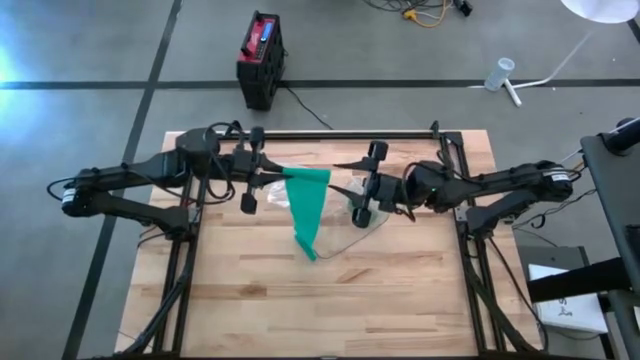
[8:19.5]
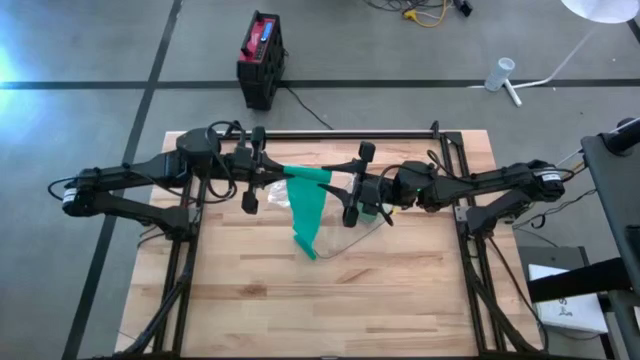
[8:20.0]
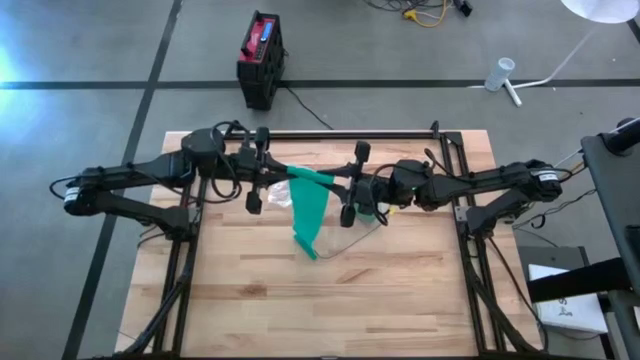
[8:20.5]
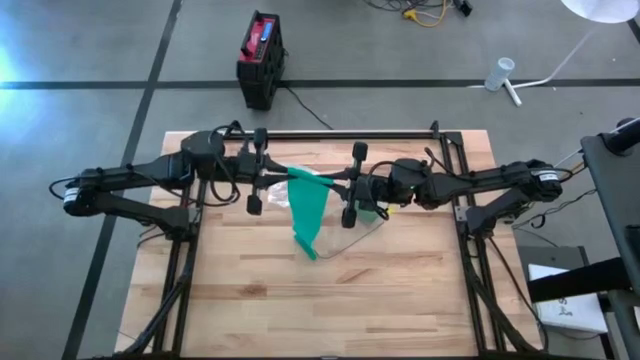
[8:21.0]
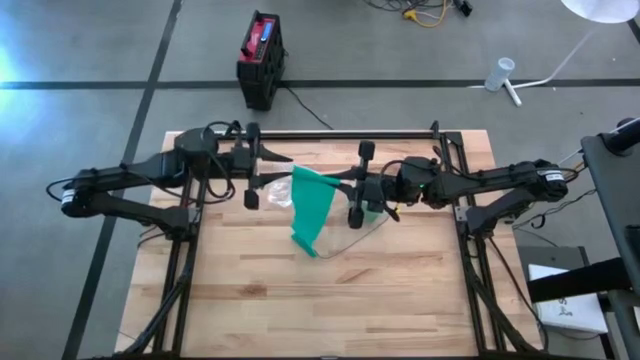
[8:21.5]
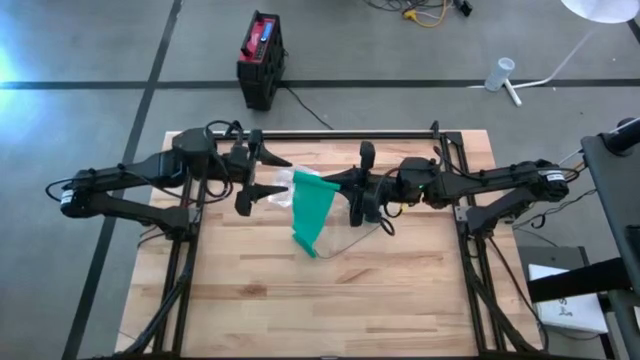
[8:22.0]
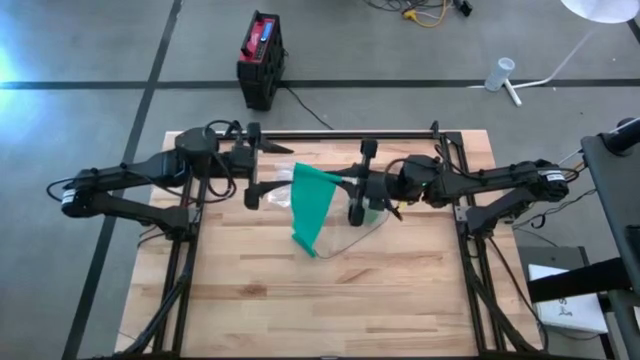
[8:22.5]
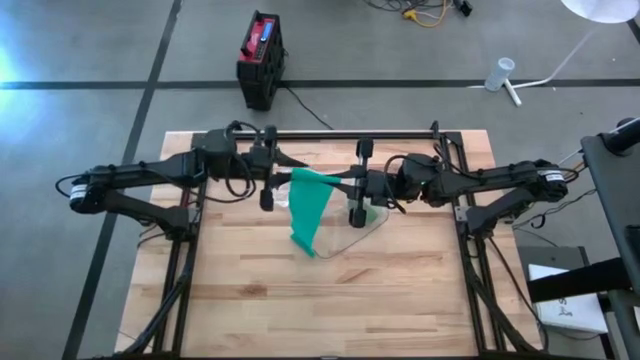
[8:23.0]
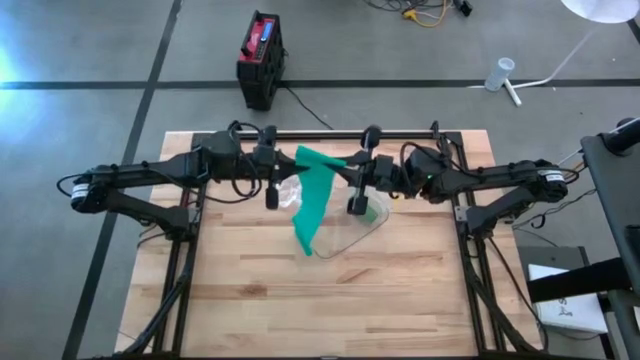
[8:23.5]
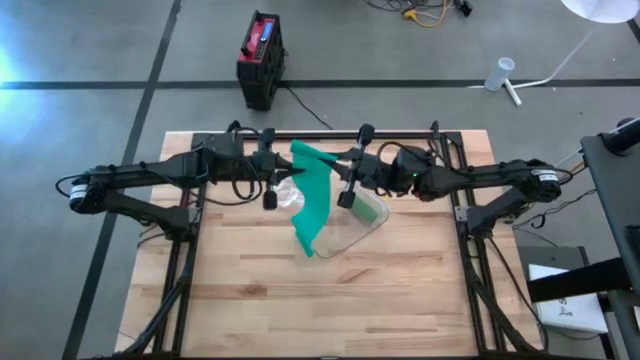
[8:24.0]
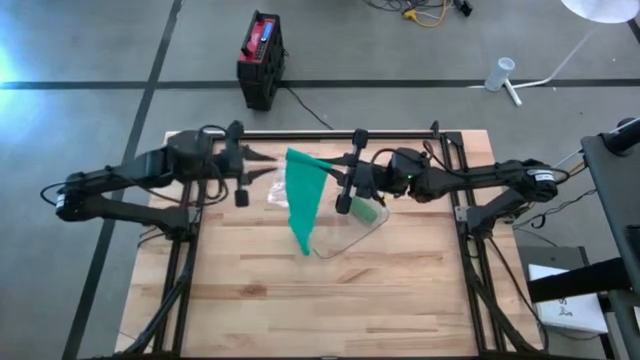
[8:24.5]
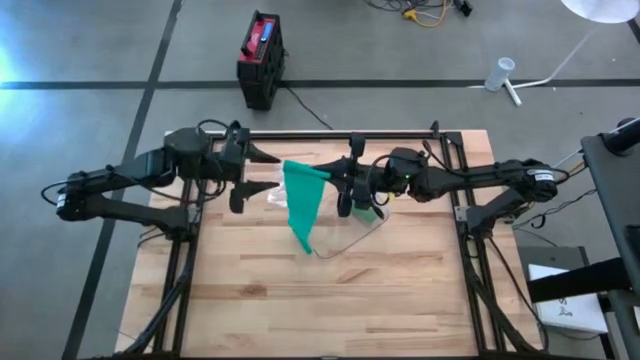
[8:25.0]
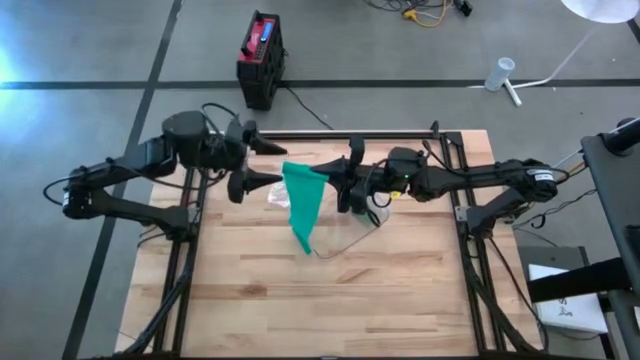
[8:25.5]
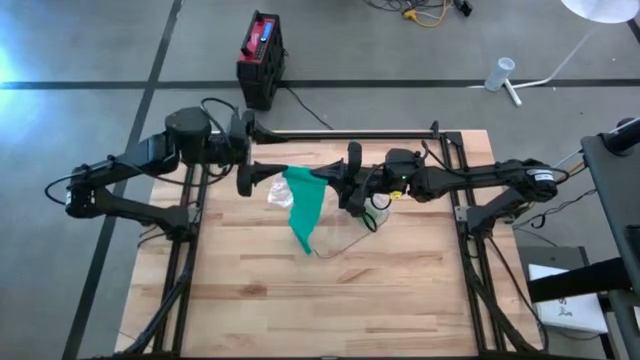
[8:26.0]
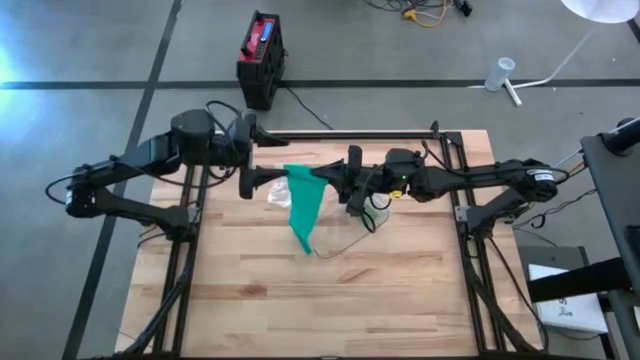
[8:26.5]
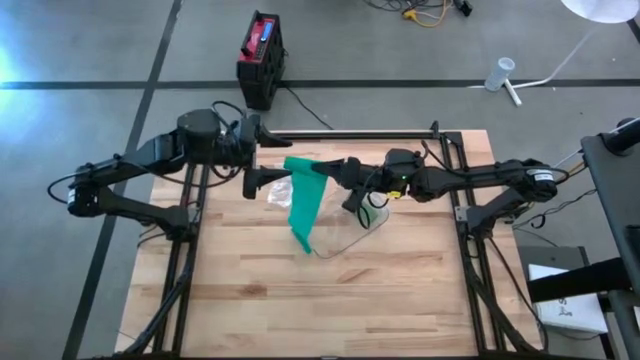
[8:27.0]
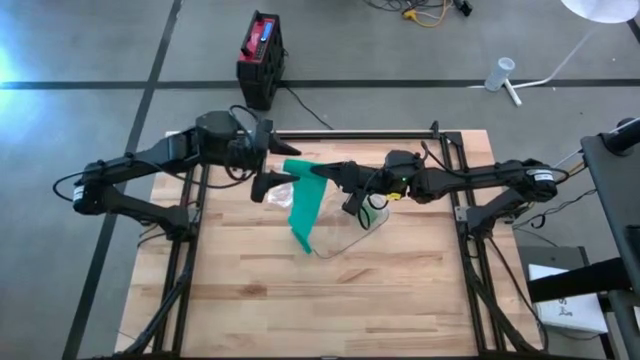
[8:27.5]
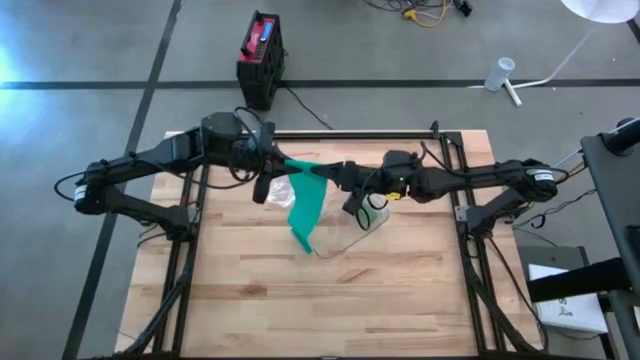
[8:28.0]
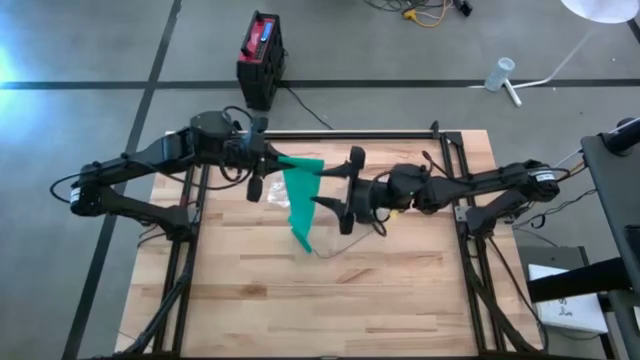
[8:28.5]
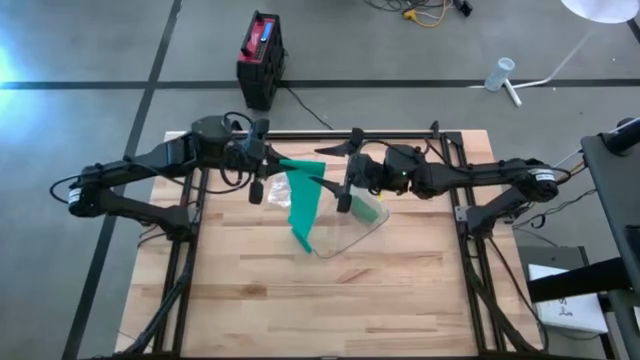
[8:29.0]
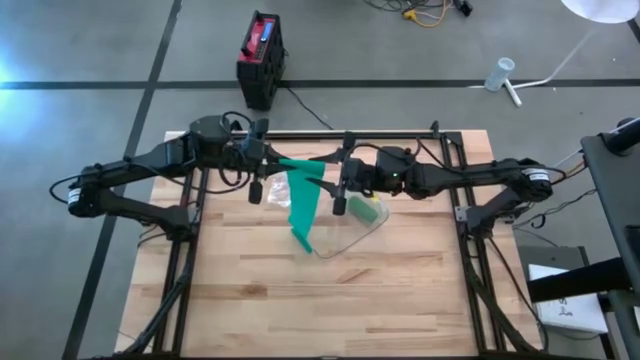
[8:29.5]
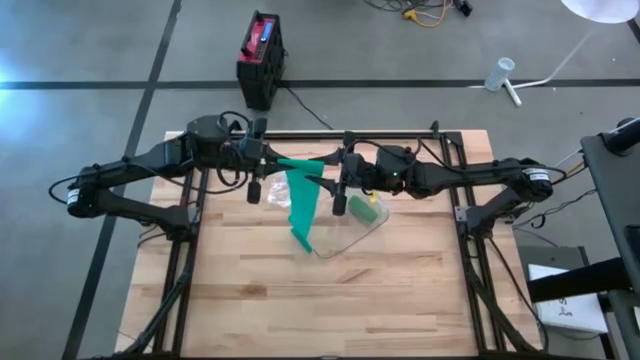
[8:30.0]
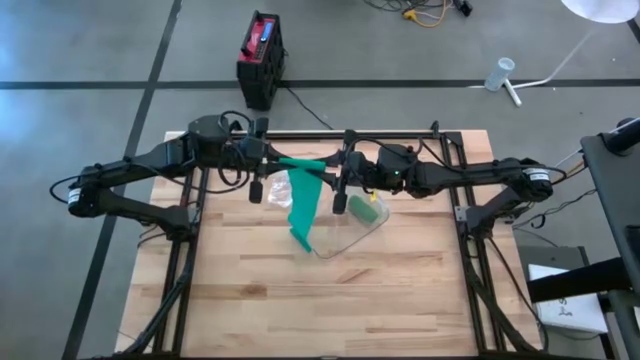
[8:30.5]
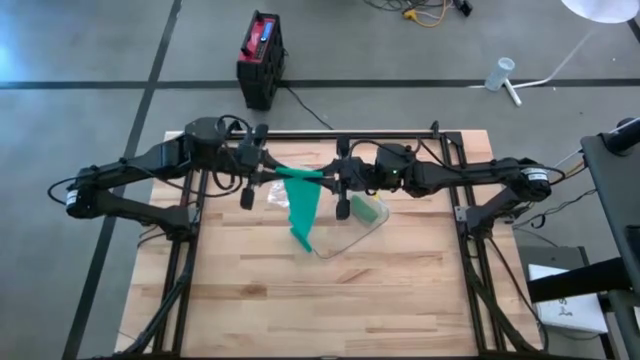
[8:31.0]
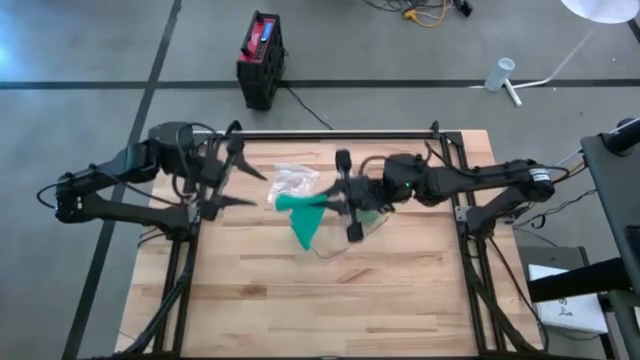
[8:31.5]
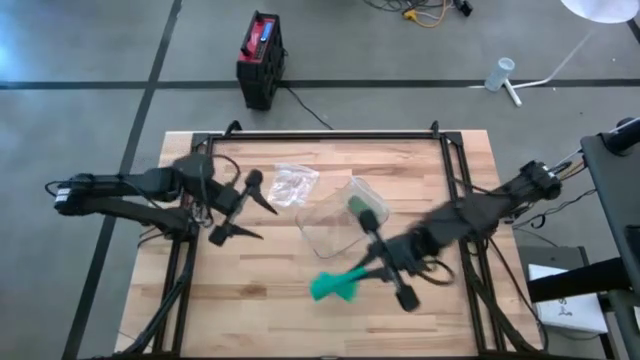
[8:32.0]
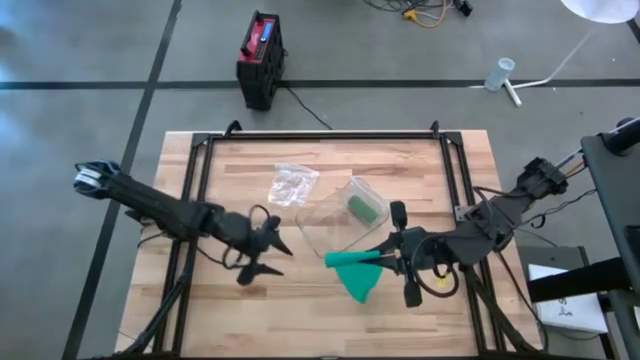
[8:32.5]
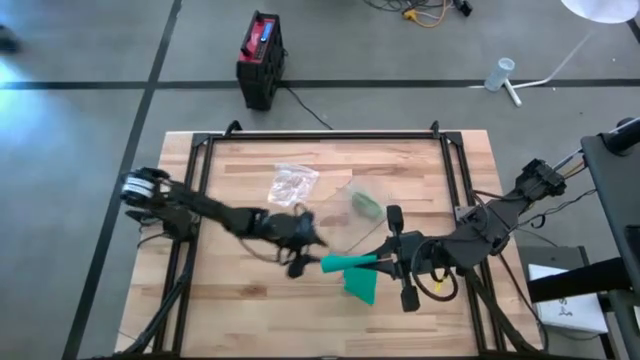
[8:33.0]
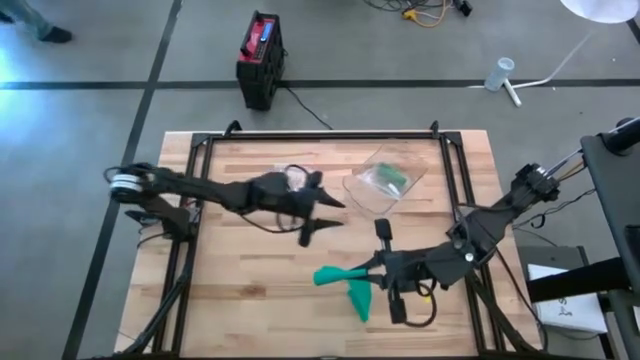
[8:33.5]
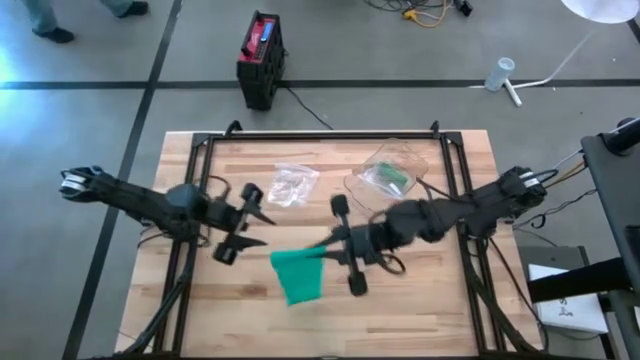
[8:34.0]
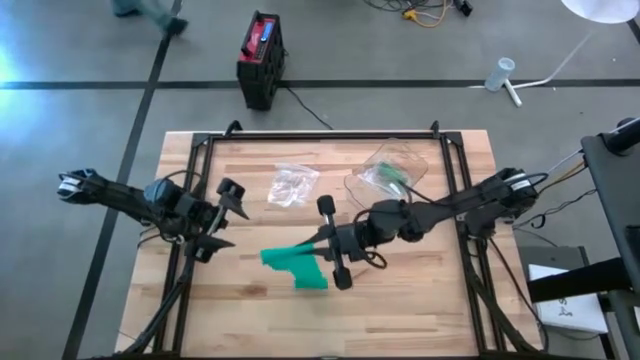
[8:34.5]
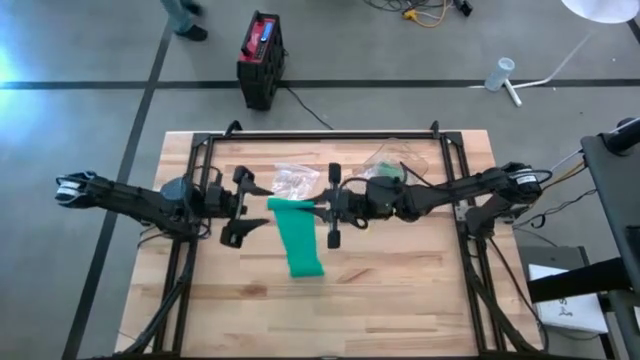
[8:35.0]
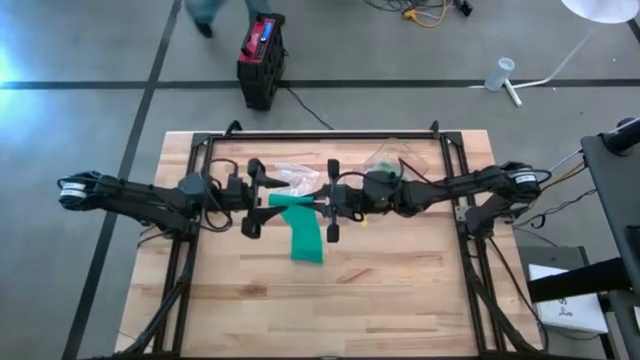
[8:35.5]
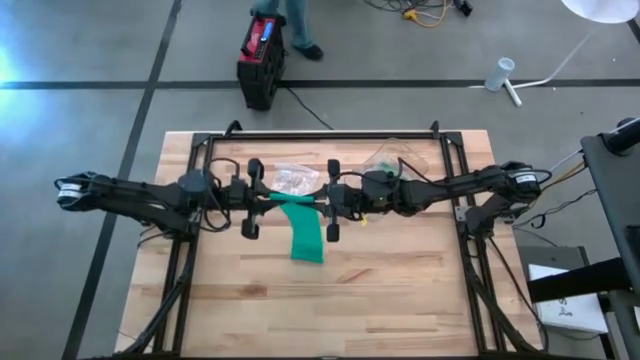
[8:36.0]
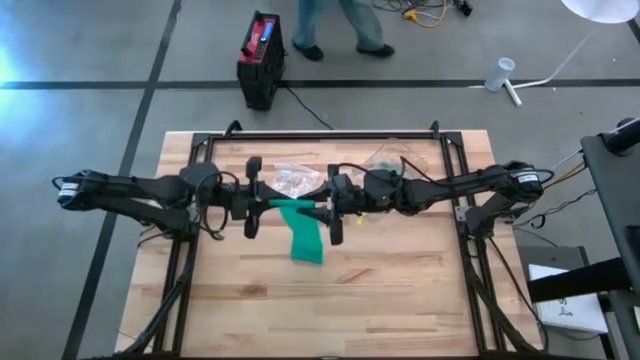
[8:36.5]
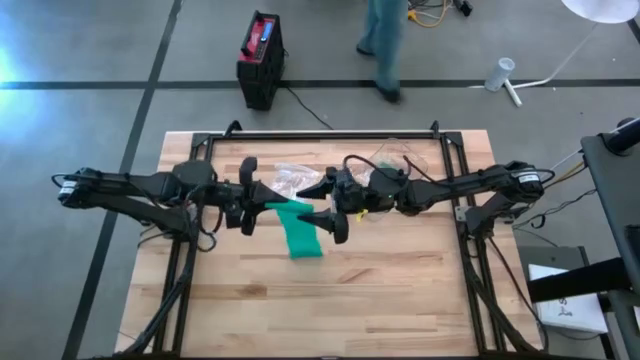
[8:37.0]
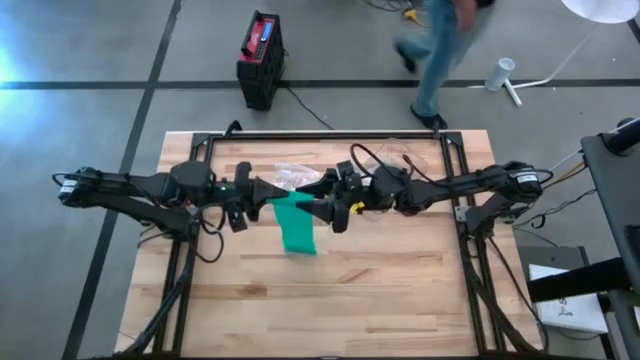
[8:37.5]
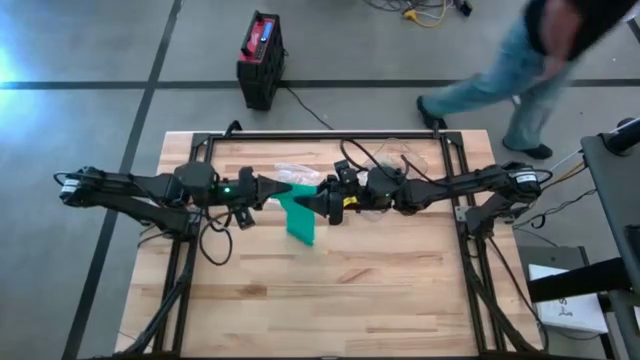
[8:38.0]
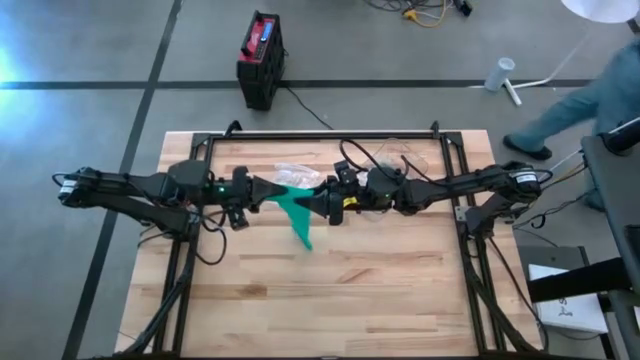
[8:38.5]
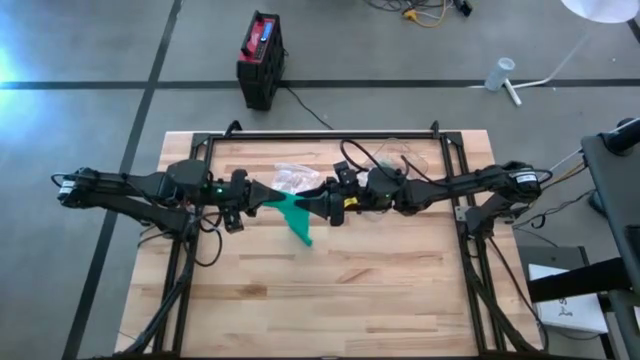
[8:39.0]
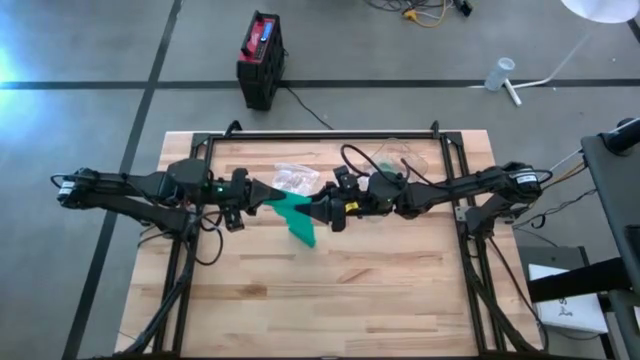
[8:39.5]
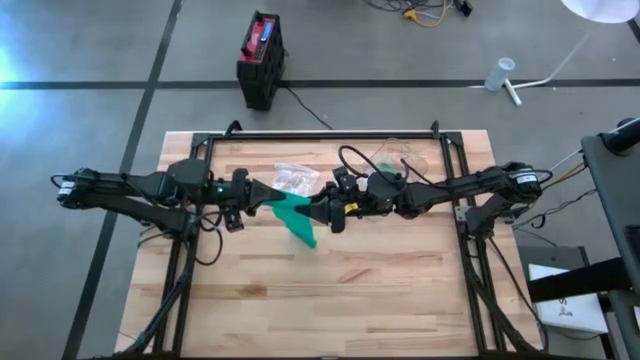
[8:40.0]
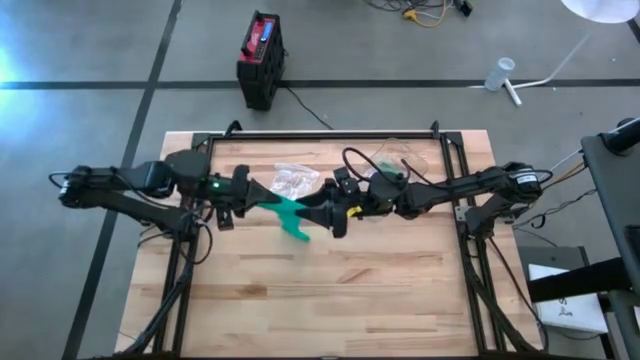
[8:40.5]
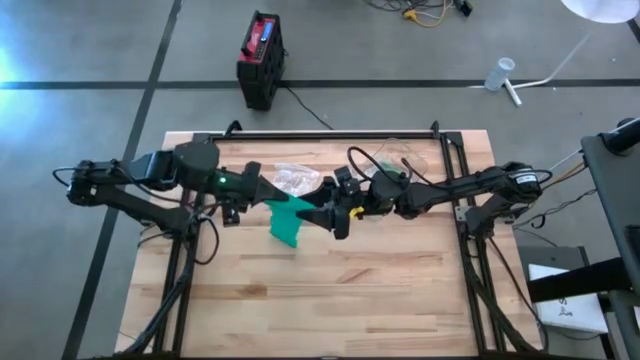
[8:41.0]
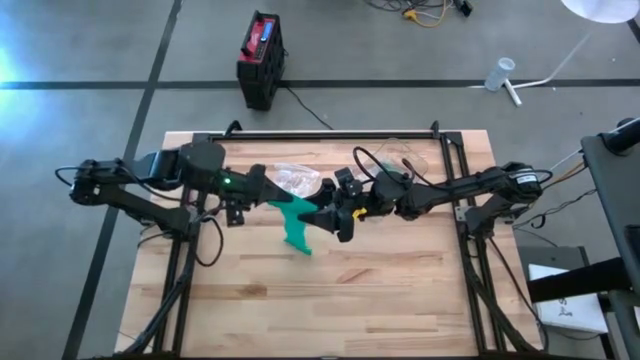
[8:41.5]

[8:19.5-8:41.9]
Task: Roll bandage
Roll the dark green bandage
